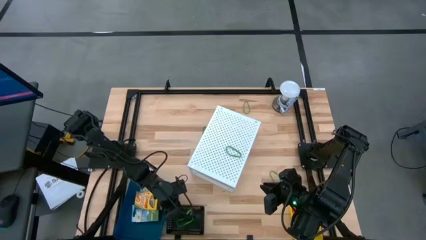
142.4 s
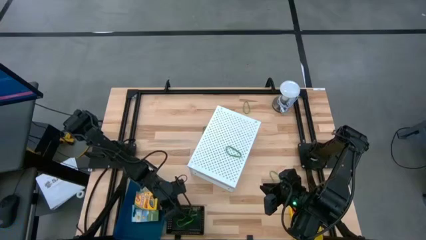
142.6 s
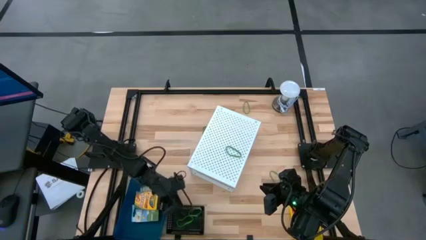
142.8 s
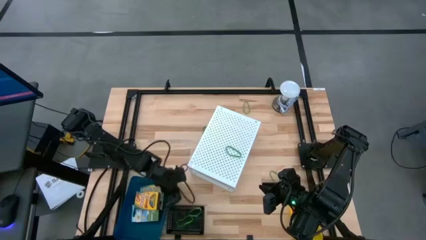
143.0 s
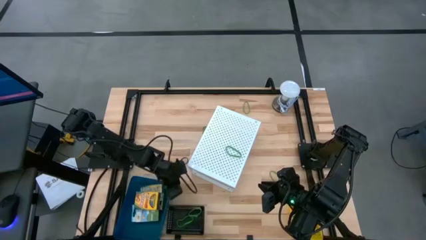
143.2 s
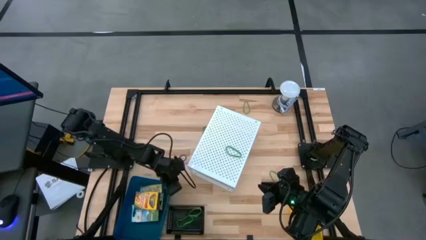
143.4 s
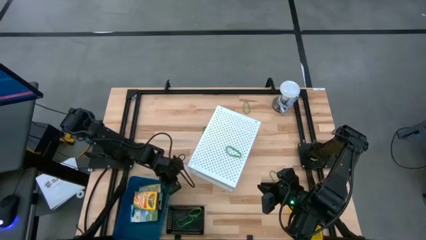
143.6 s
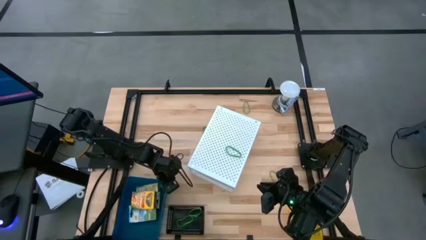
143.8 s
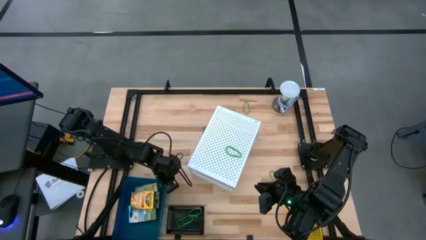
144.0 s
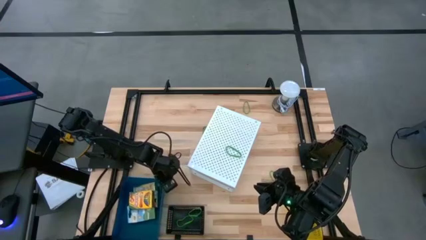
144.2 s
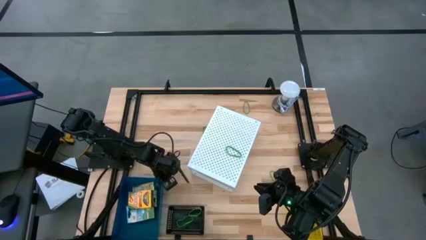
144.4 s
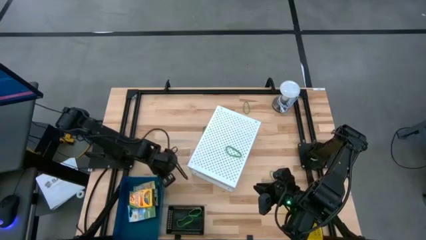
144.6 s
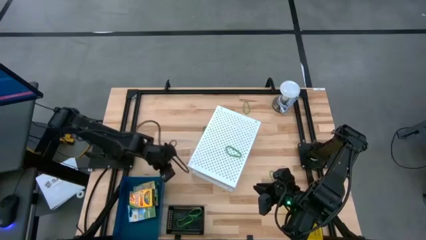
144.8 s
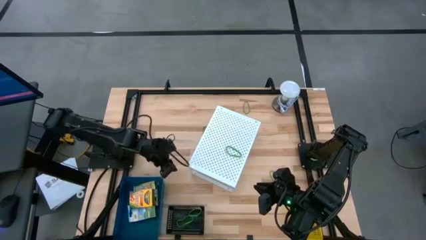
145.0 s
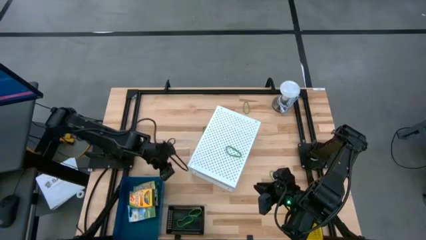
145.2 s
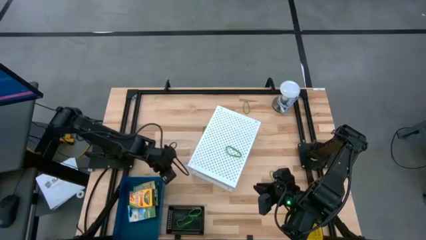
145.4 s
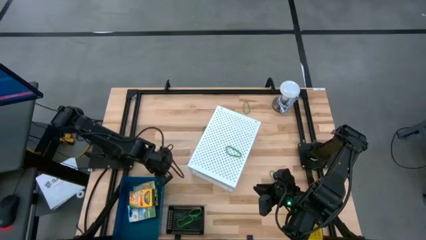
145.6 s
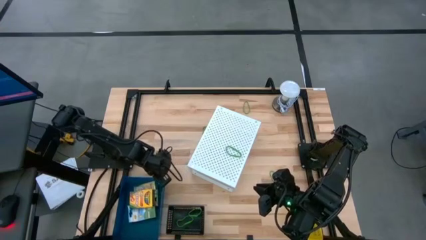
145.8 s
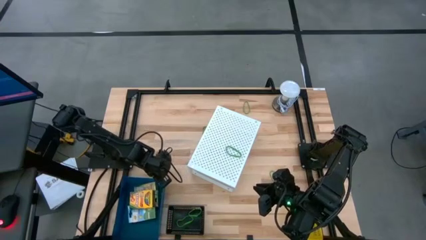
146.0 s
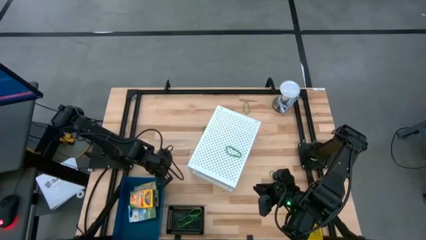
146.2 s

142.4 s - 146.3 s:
Task: Pick & Place Office Desk Supplies
Adjust the blue bin

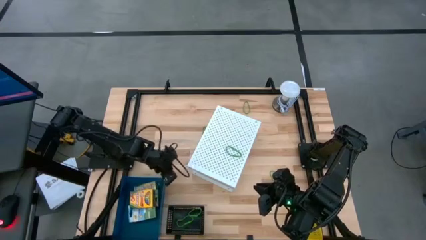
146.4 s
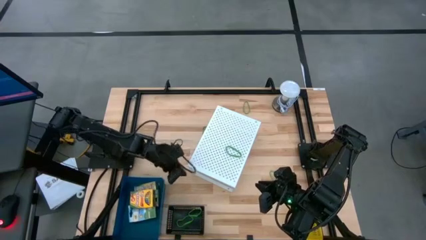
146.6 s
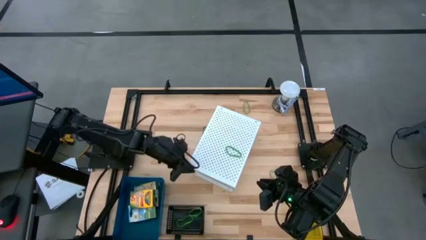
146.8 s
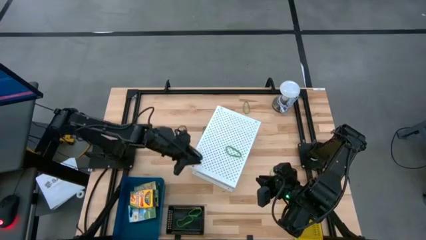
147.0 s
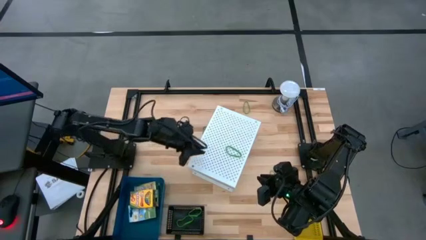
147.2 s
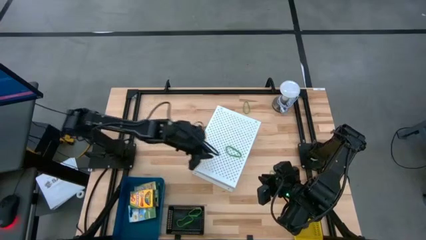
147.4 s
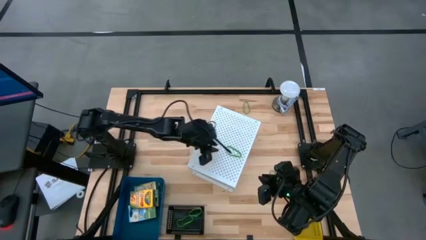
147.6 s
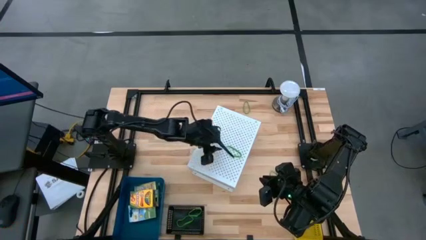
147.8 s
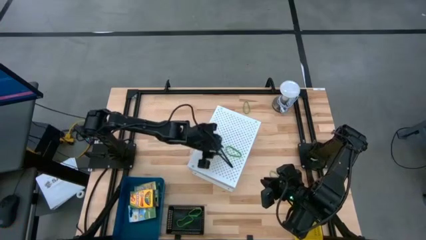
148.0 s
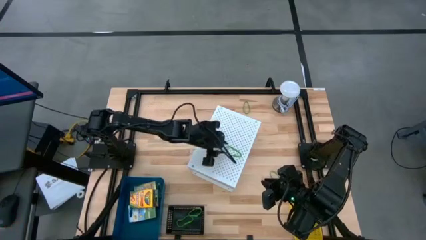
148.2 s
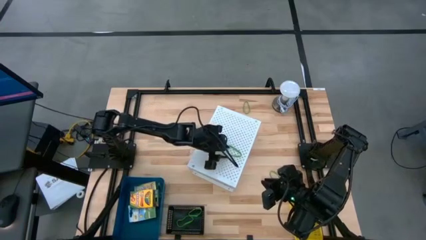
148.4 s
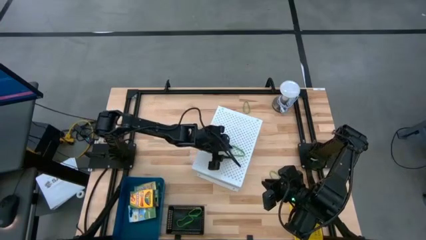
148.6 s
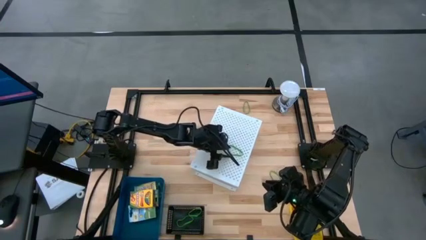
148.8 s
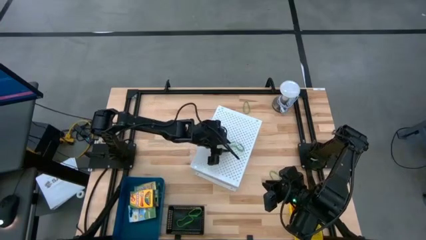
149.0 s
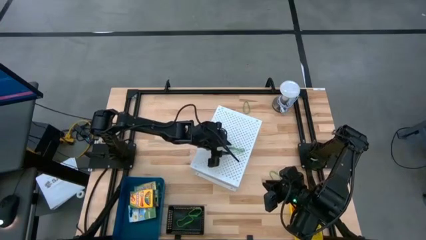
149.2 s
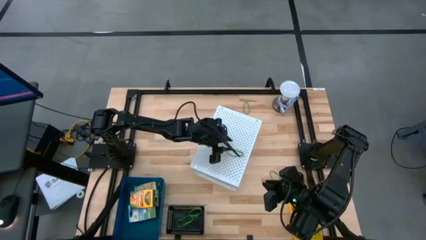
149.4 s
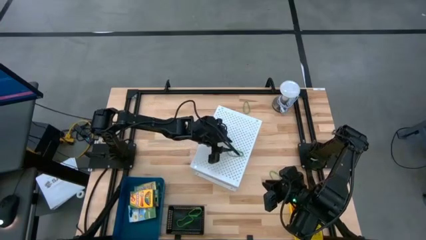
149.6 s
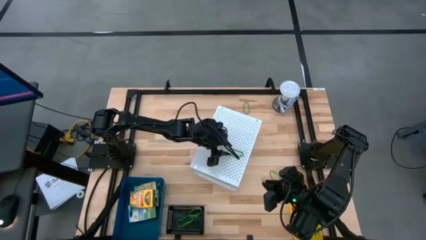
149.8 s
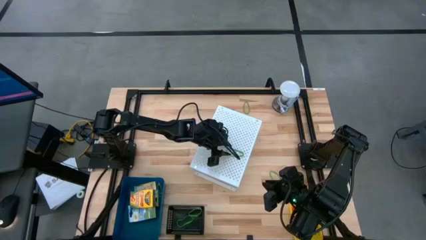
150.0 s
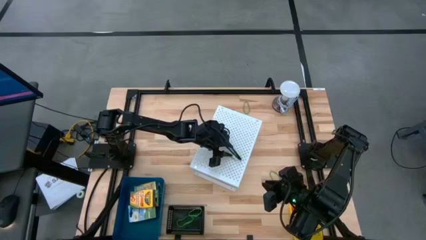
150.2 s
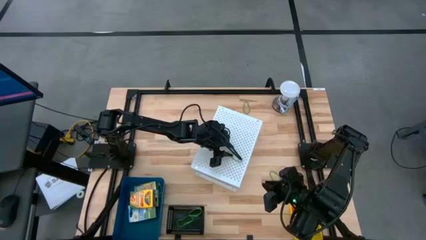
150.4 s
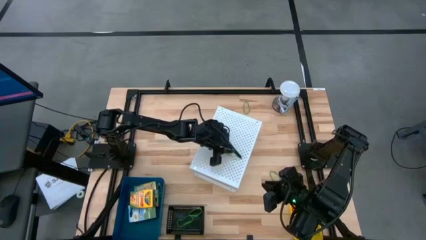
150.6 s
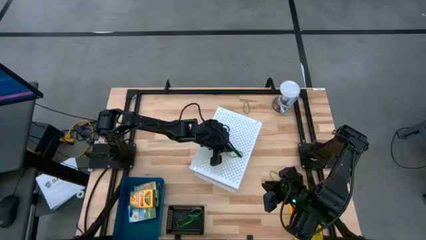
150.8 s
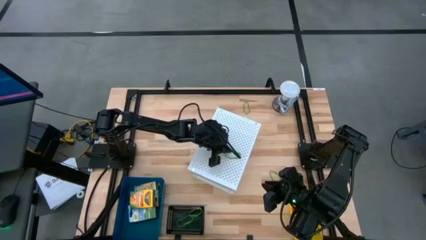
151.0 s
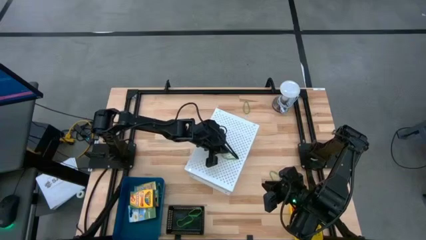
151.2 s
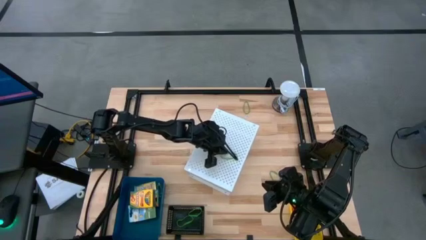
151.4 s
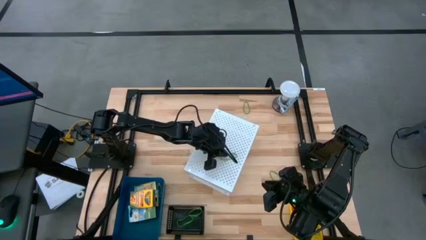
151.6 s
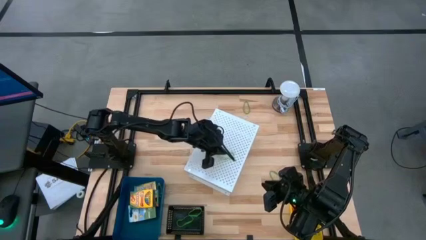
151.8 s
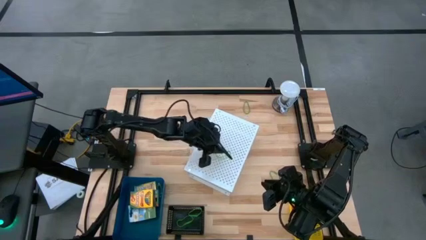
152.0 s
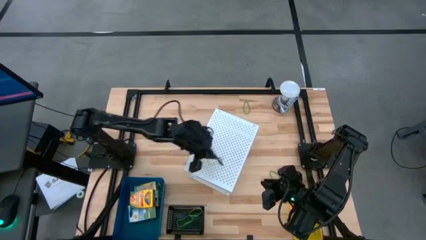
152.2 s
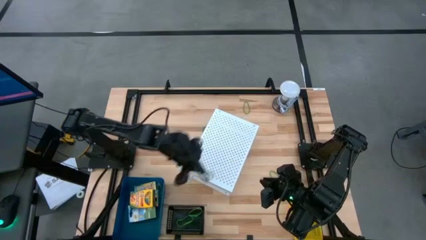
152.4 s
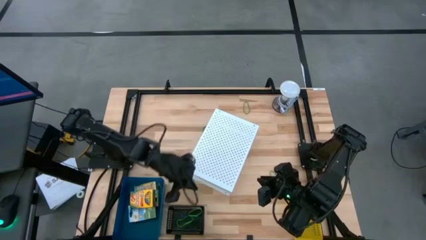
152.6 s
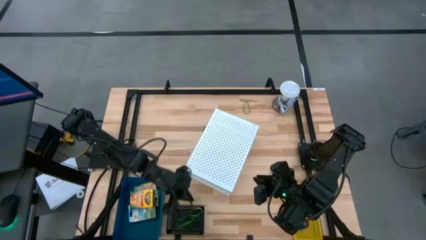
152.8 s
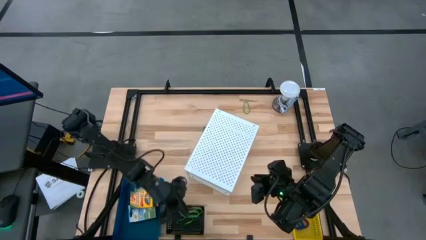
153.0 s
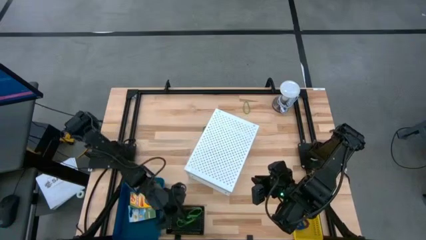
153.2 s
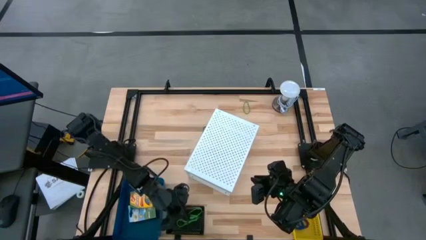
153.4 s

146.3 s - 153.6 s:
Put the green rubber band into the black bin

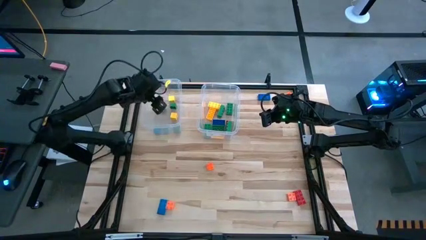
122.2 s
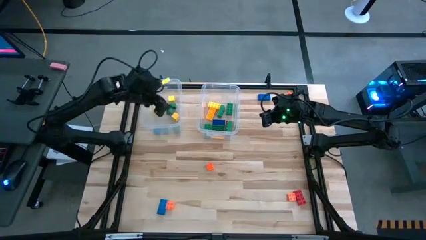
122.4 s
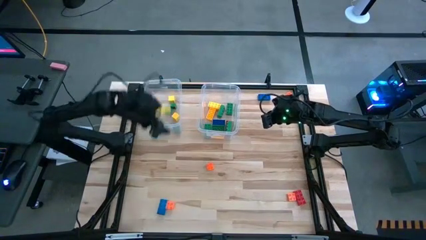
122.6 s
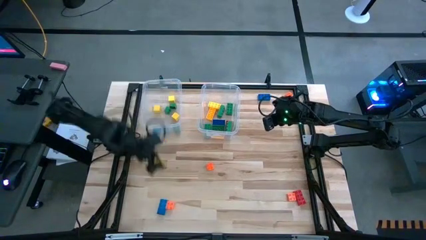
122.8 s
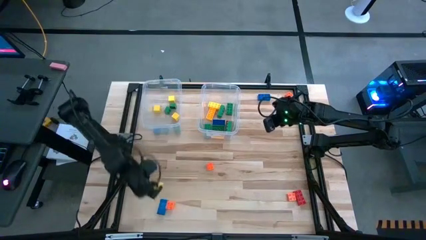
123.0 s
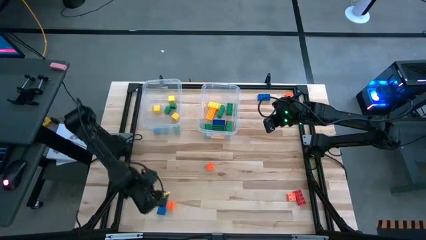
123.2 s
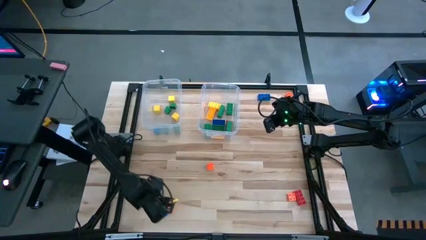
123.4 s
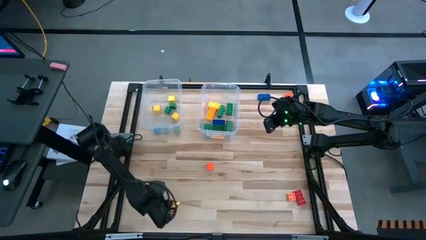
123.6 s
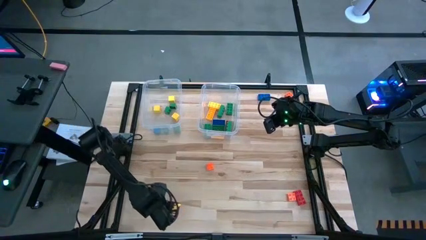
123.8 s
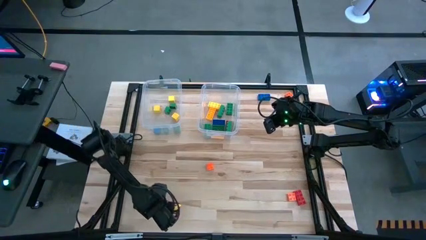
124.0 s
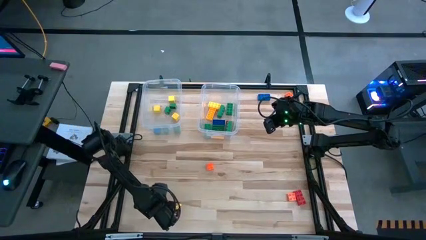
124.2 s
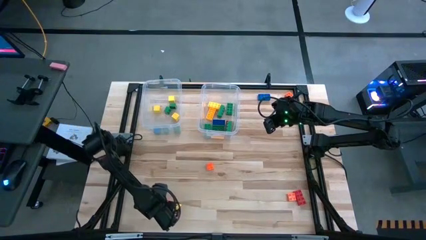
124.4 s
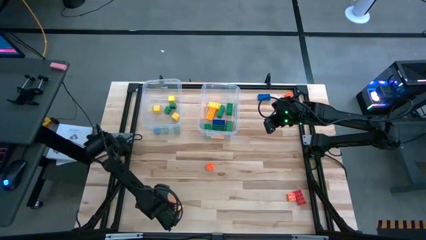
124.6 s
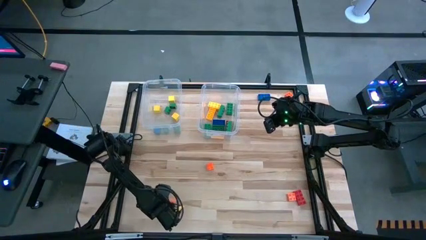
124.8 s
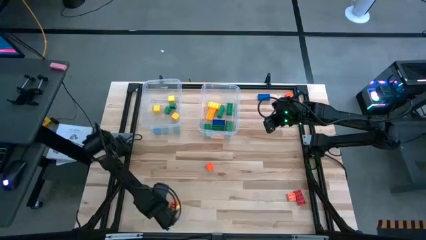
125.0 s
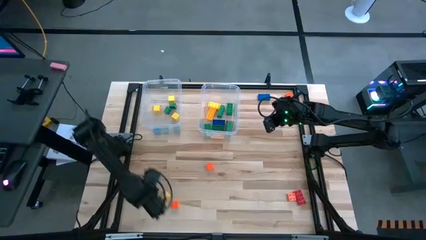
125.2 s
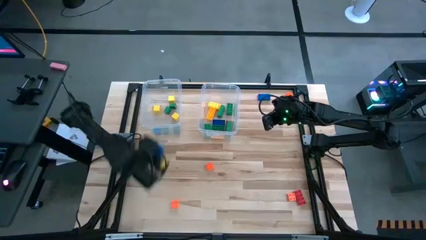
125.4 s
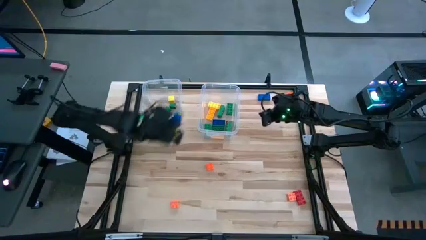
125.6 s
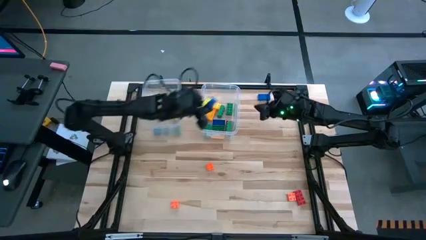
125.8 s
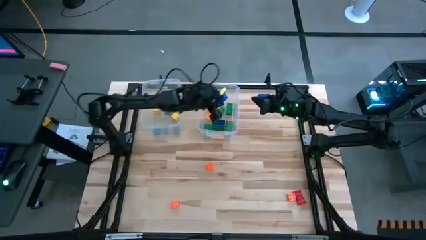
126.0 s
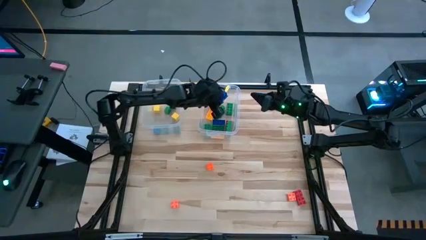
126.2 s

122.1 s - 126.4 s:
Task: Sort blocks by size
Put the blue big game piece into the right transparent bin
